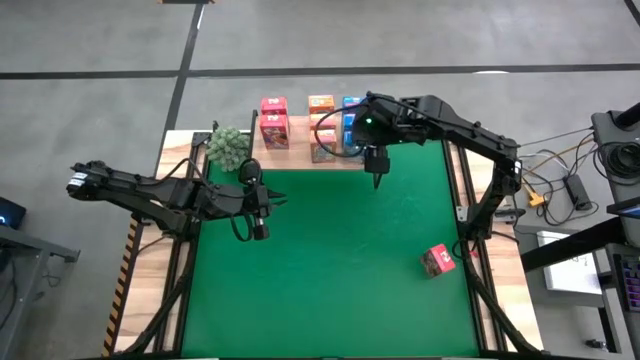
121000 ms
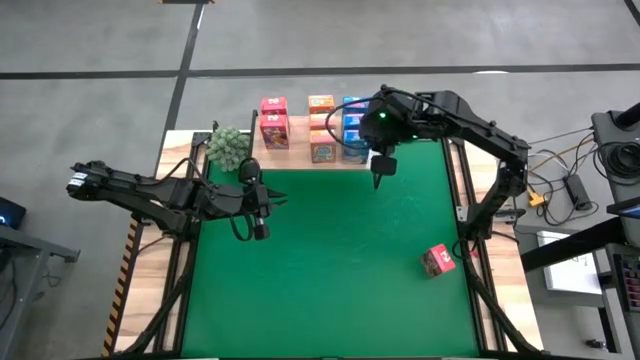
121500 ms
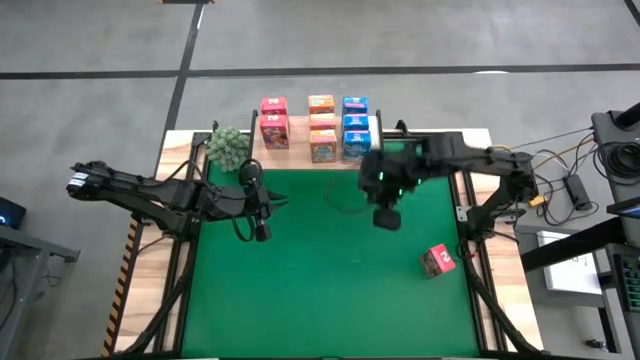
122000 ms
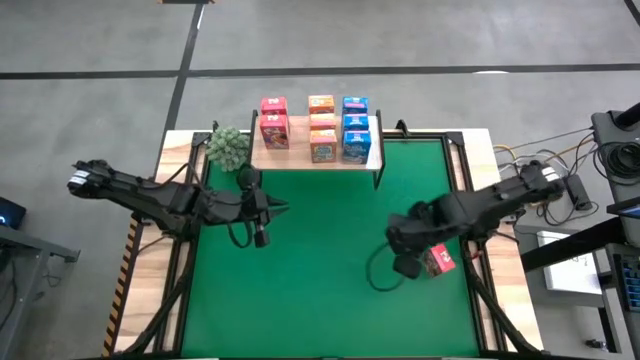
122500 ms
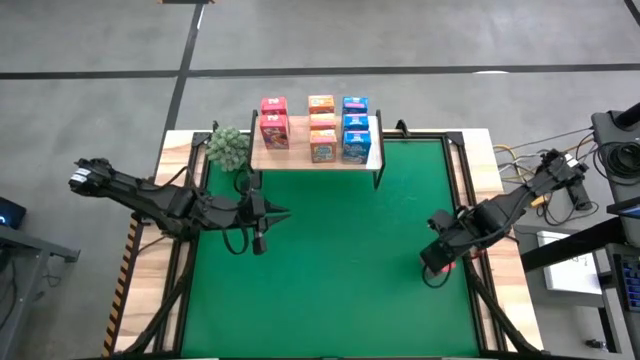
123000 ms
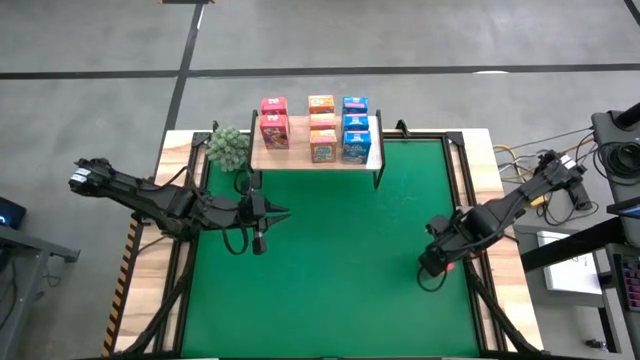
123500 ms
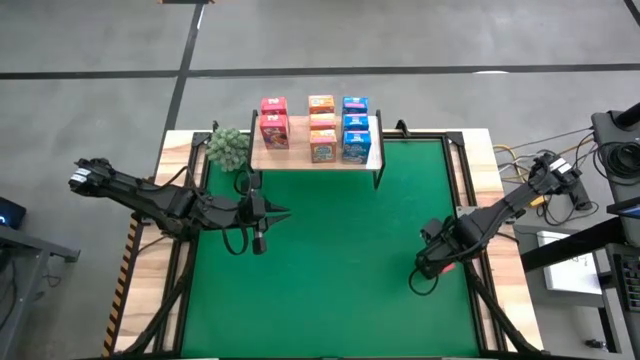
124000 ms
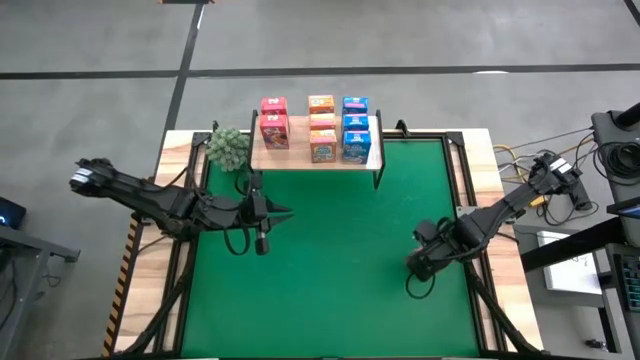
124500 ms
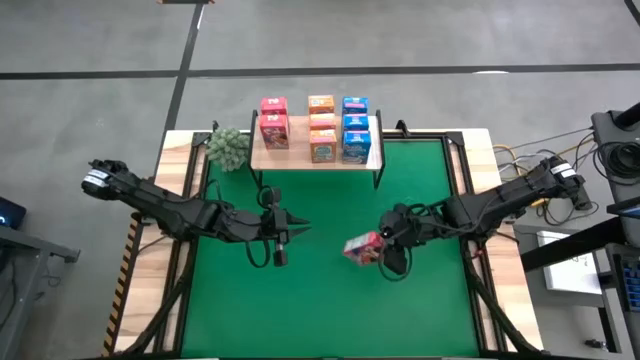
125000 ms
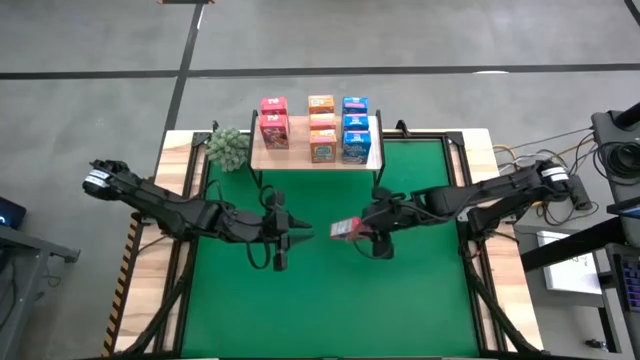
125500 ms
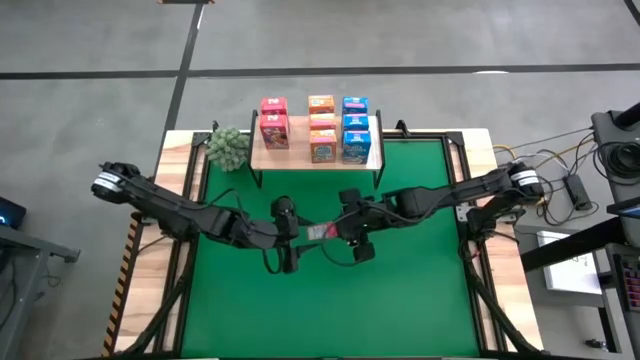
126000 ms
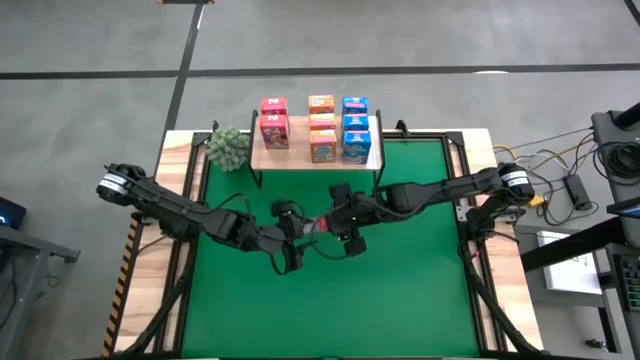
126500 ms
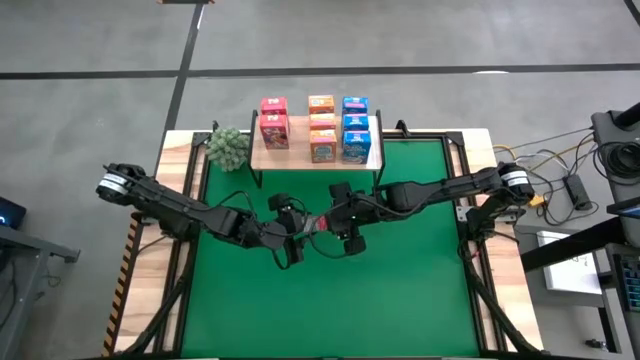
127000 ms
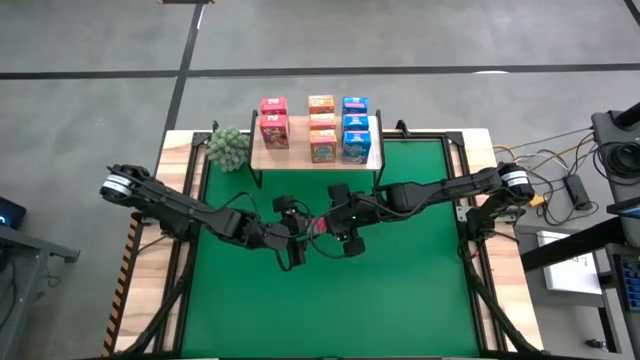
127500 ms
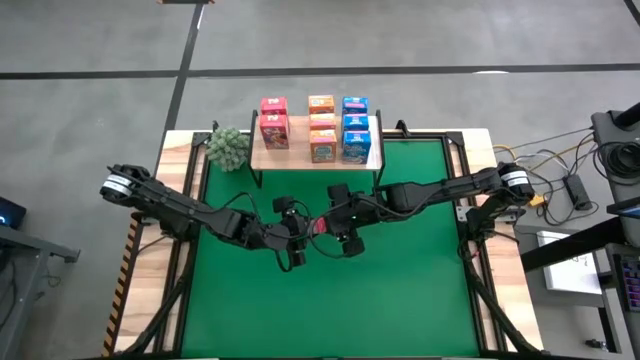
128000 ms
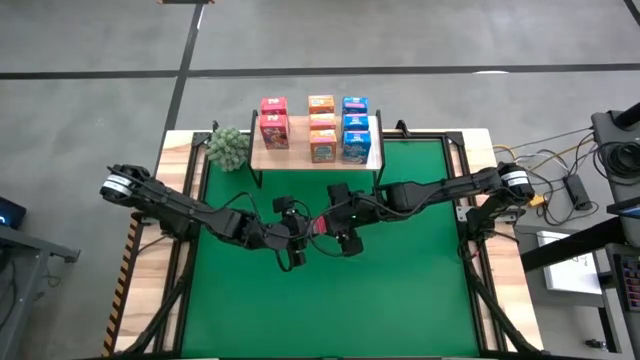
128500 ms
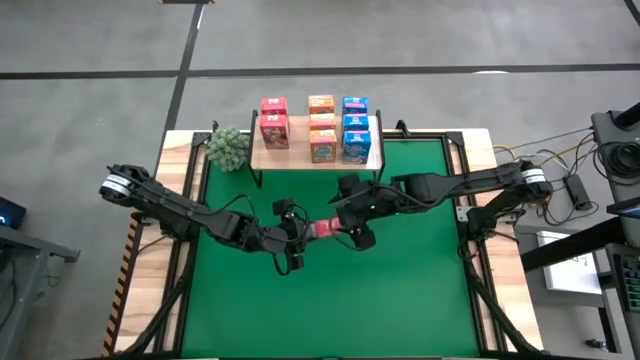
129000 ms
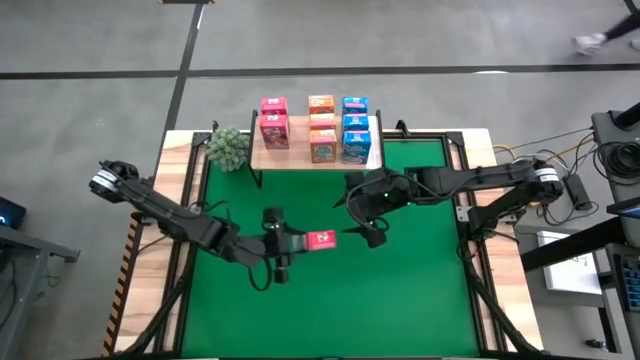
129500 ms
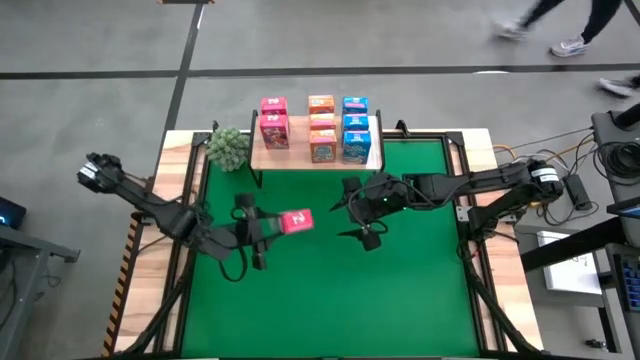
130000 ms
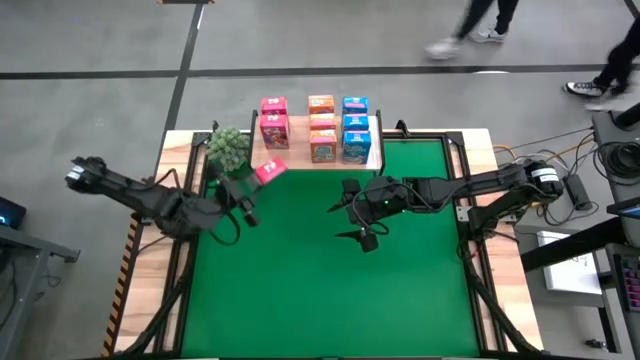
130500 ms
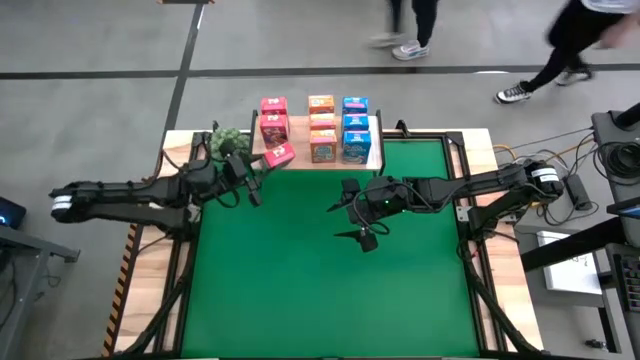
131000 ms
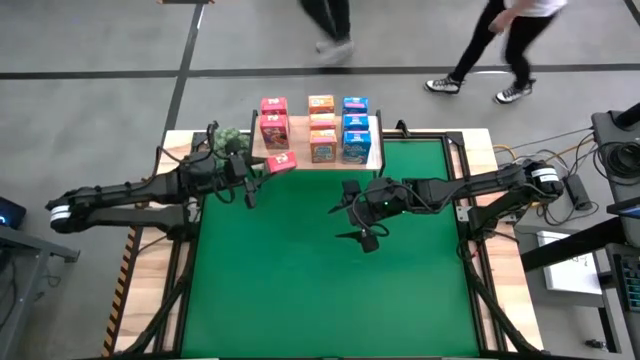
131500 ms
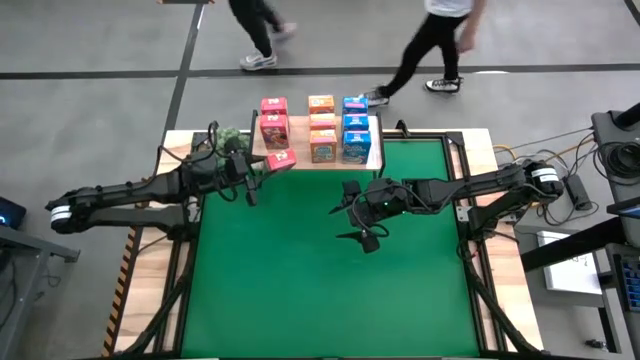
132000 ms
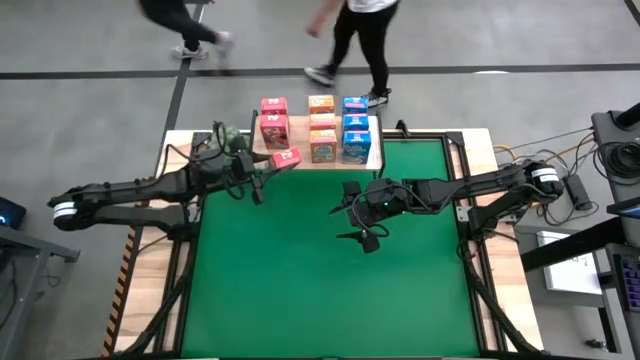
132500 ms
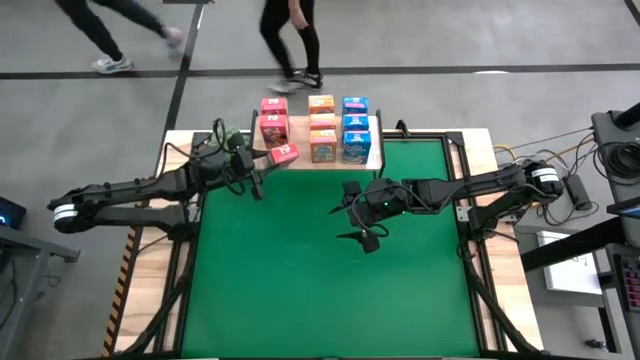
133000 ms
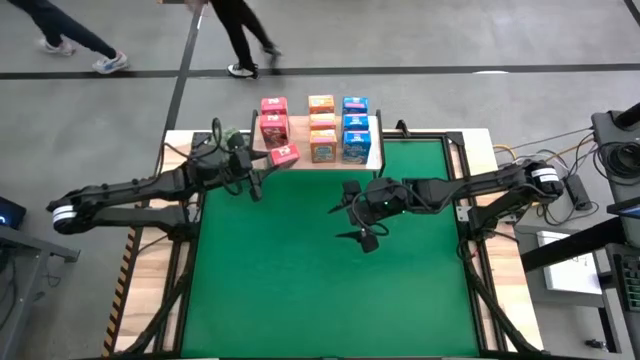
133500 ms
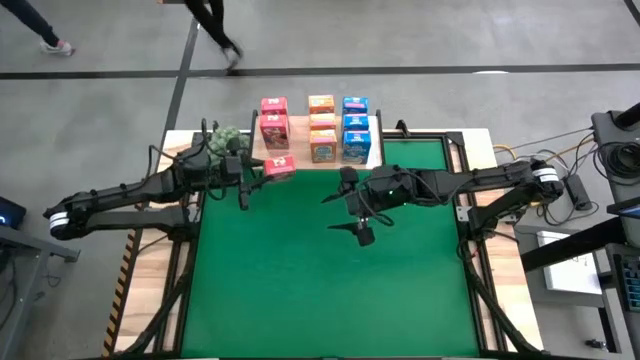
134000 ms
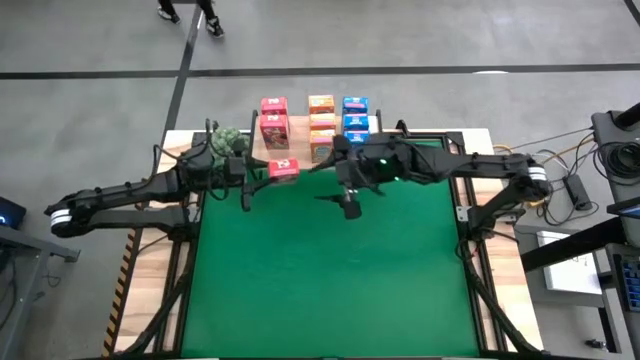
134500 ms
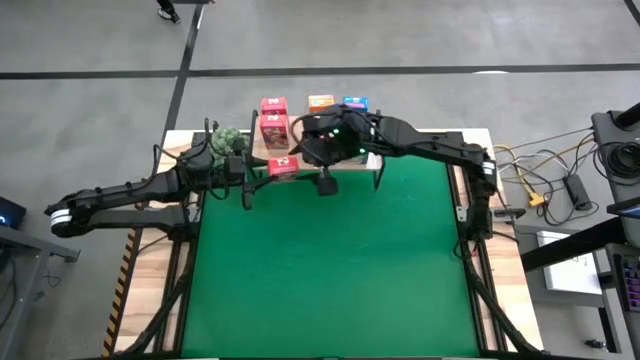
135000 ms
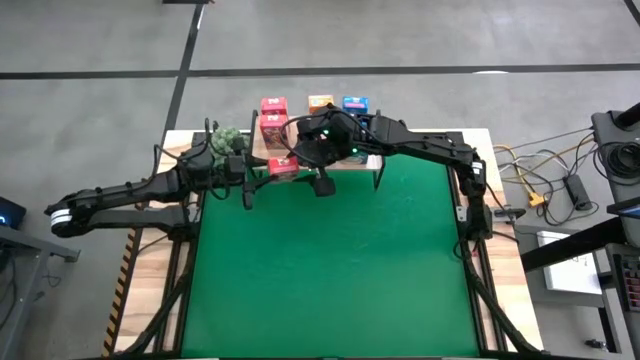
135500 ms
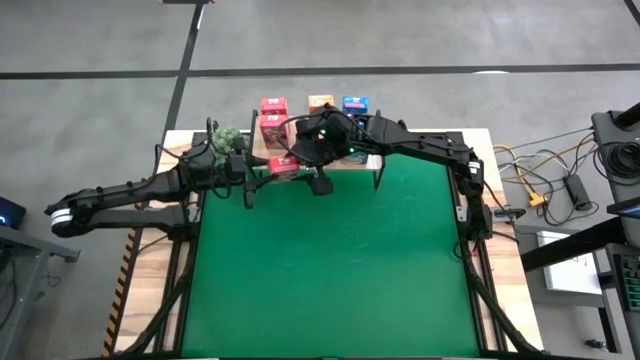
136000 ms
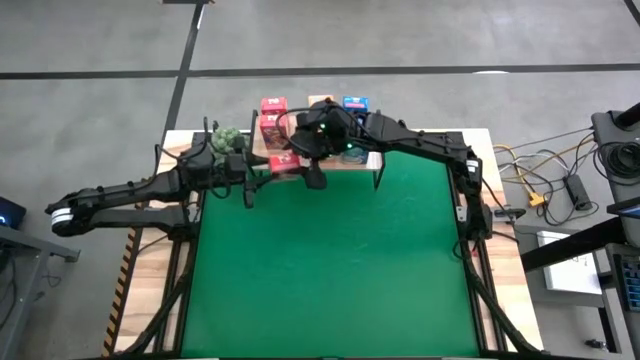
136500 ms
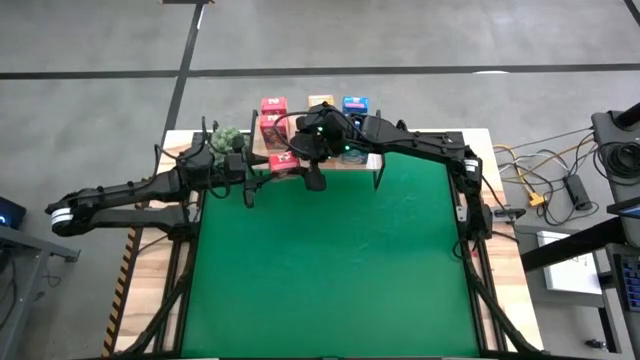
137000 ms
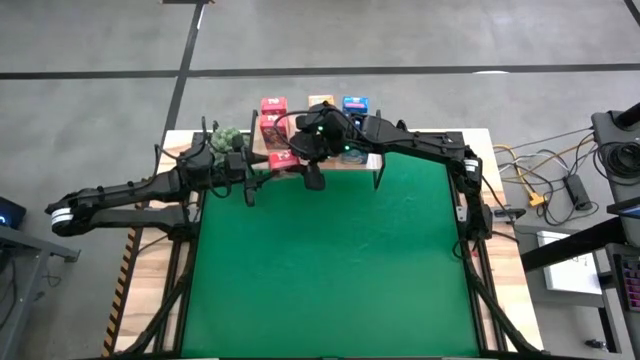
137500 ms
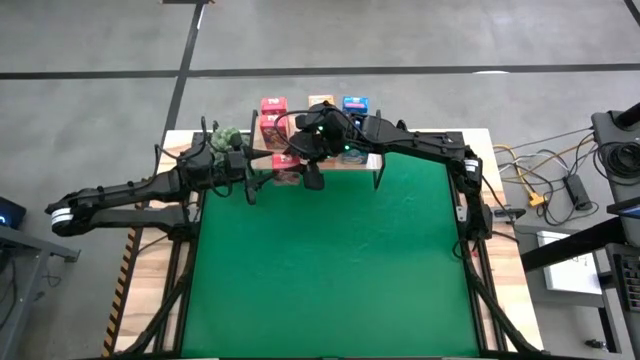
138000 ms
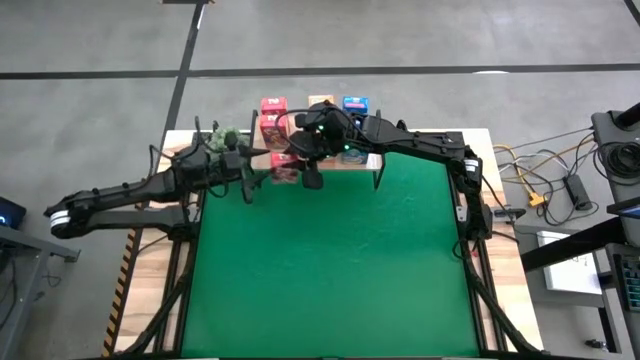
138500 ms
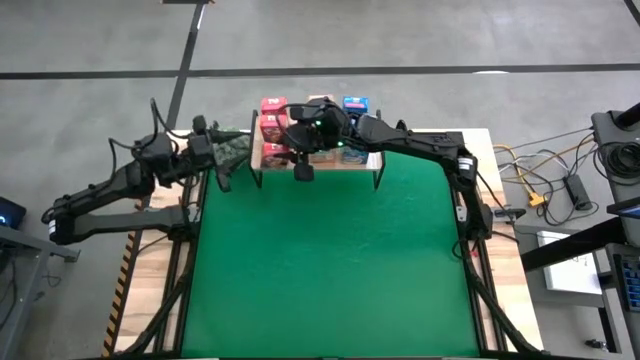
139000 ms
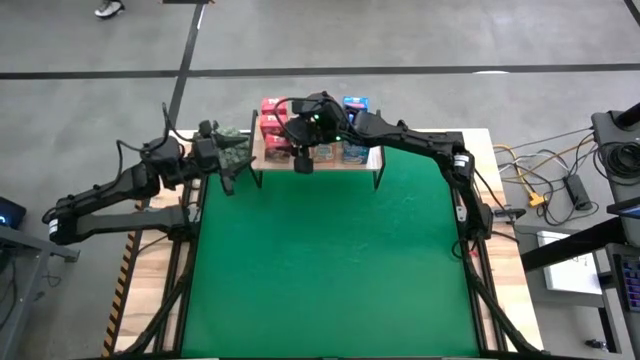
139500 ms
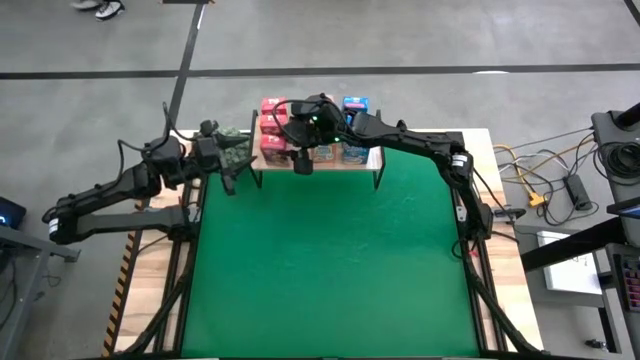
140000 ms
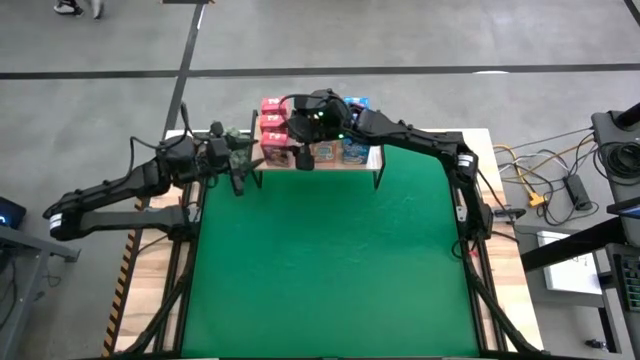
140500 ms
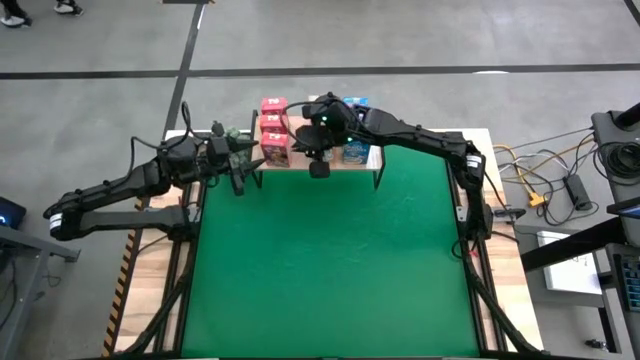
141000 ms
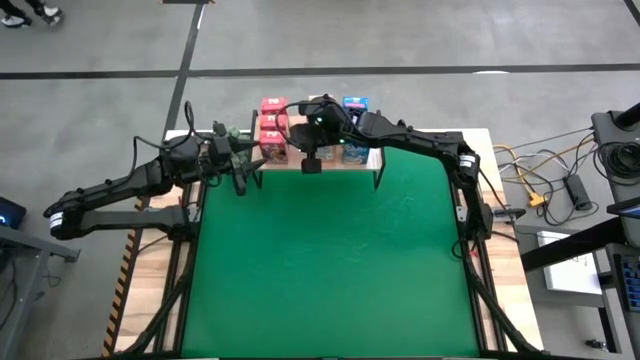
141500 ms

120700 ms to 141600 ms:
Task: Stack cereal on shelf
Put the red cereal box on the shelf aligned with the other red cereal boxes
